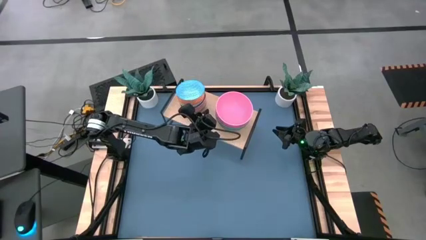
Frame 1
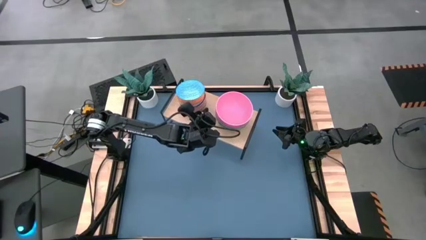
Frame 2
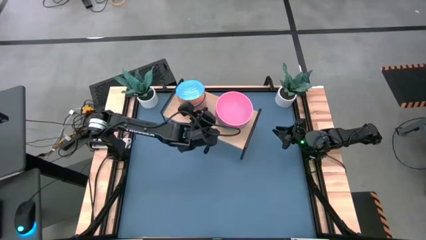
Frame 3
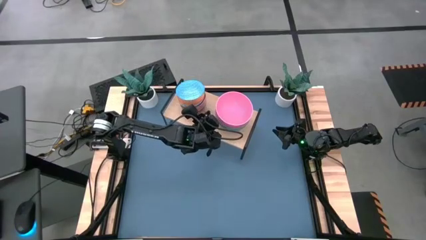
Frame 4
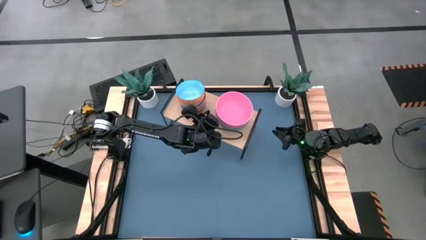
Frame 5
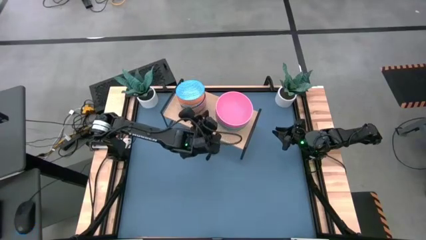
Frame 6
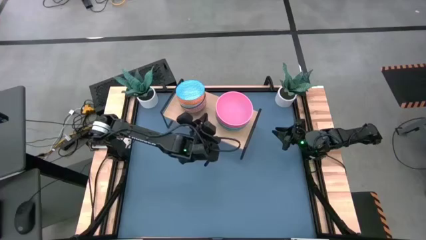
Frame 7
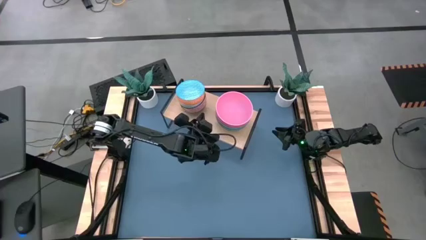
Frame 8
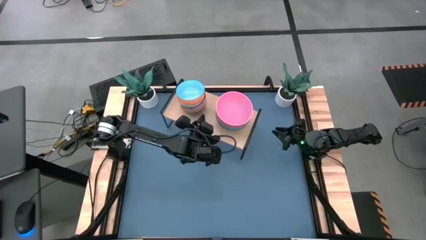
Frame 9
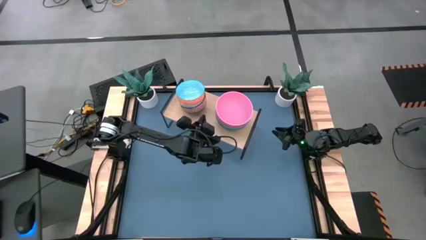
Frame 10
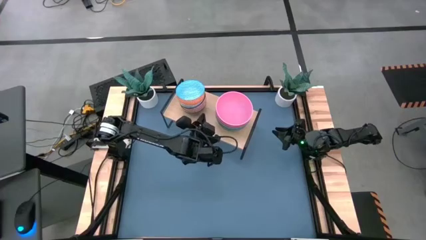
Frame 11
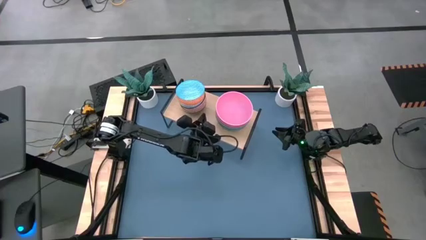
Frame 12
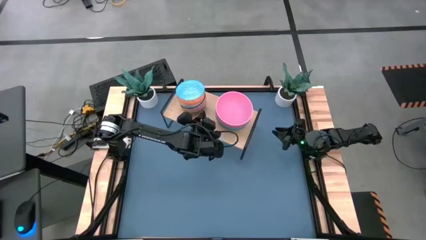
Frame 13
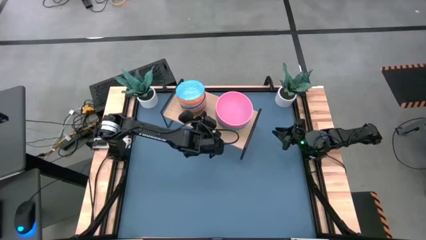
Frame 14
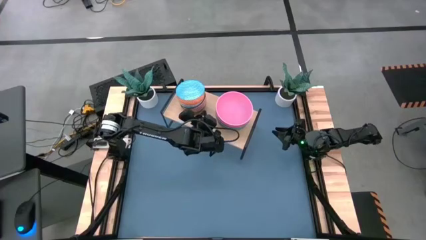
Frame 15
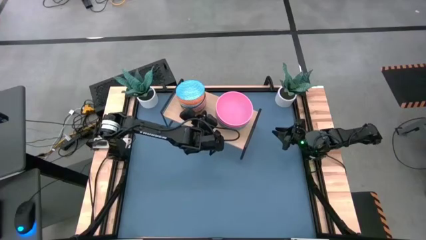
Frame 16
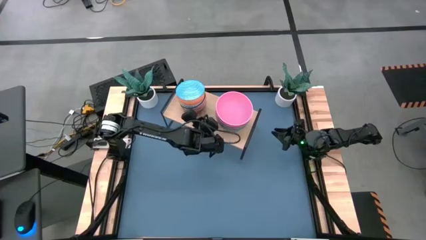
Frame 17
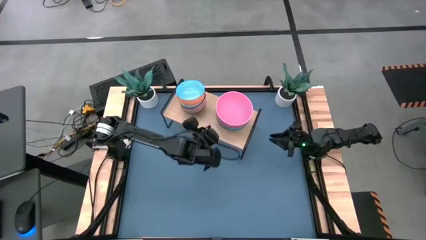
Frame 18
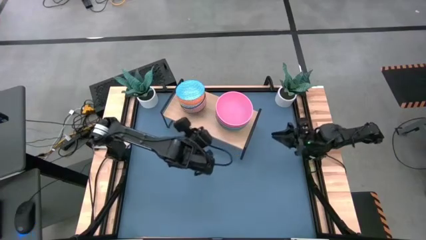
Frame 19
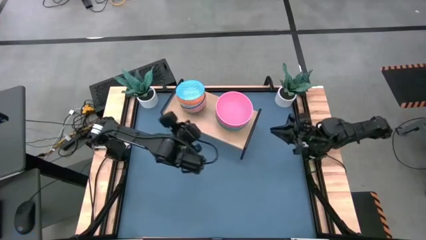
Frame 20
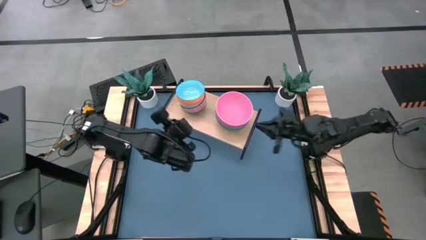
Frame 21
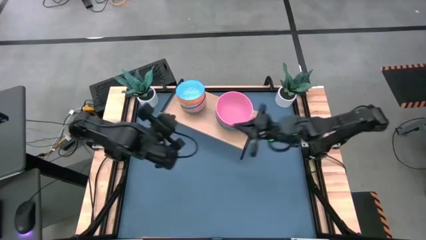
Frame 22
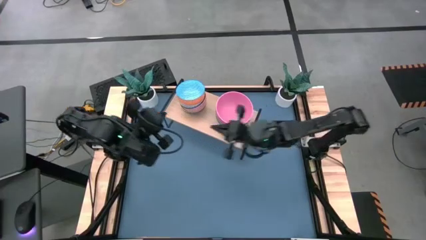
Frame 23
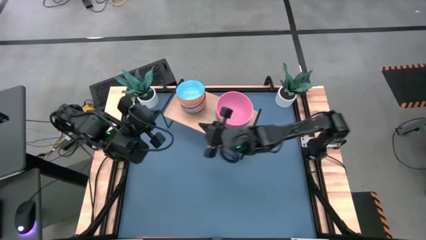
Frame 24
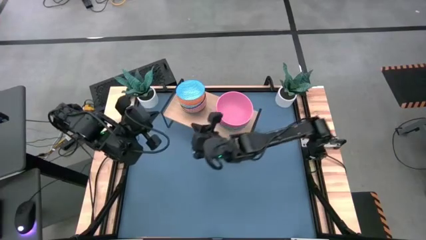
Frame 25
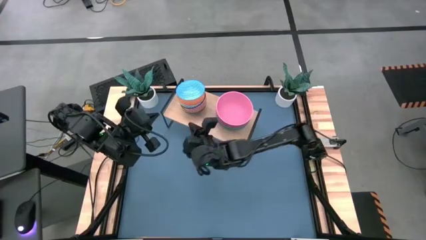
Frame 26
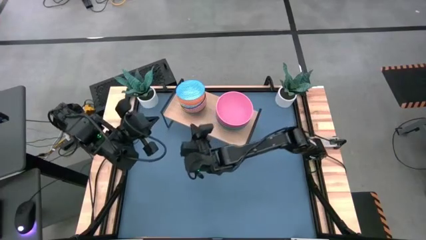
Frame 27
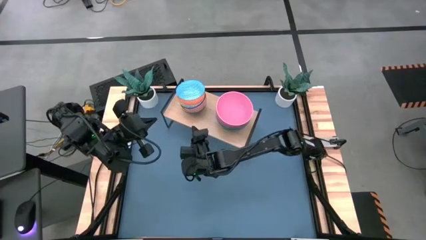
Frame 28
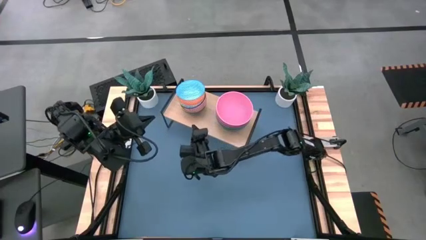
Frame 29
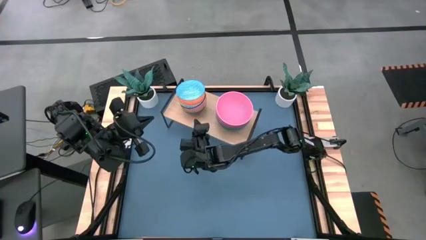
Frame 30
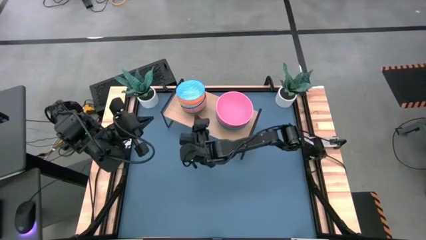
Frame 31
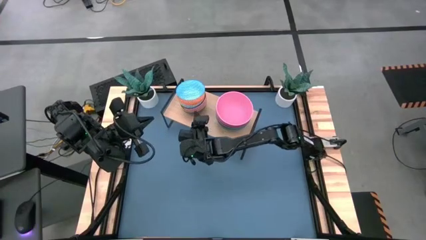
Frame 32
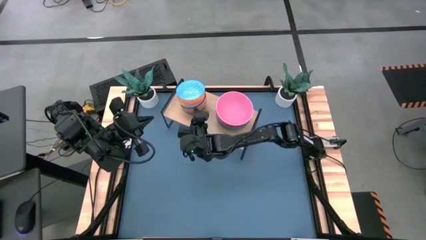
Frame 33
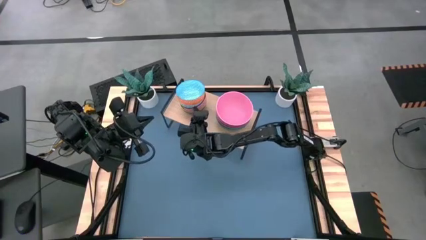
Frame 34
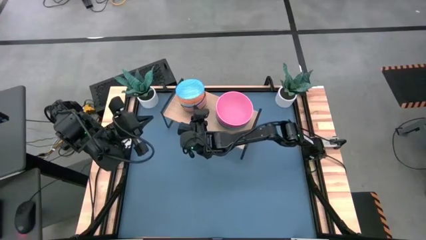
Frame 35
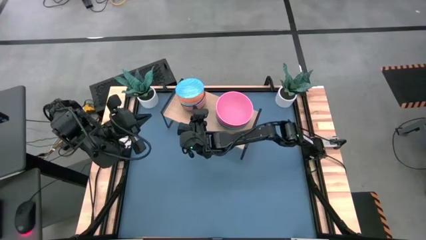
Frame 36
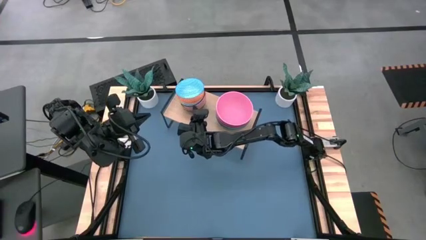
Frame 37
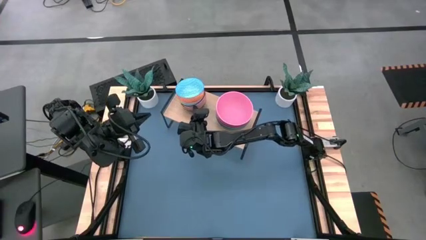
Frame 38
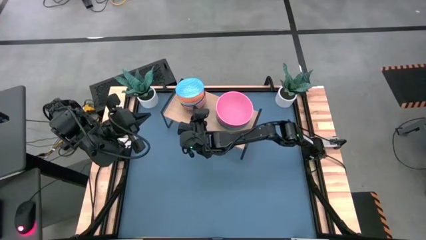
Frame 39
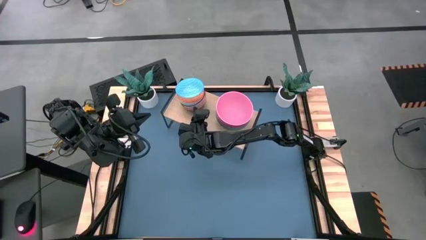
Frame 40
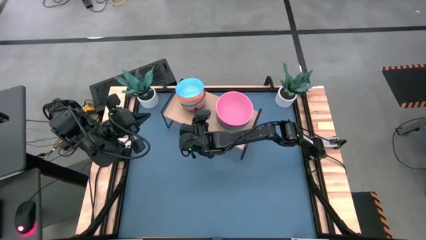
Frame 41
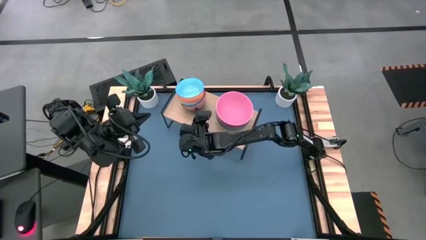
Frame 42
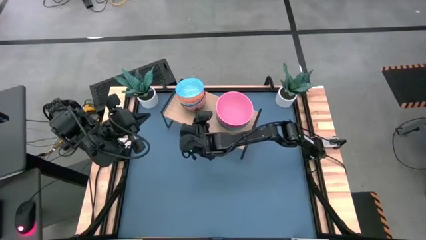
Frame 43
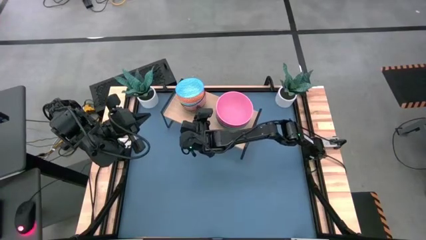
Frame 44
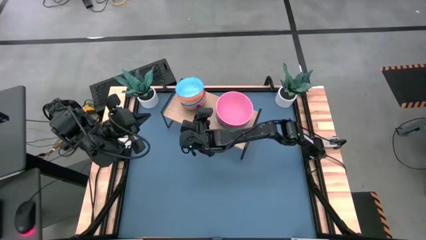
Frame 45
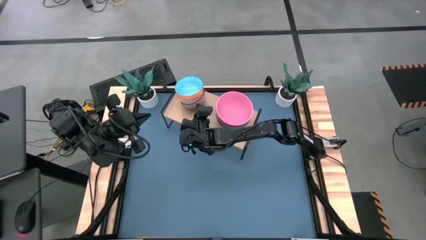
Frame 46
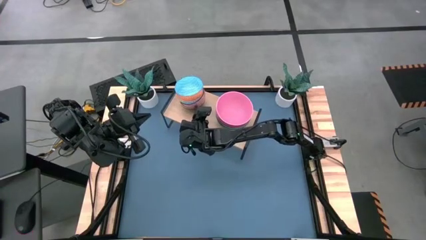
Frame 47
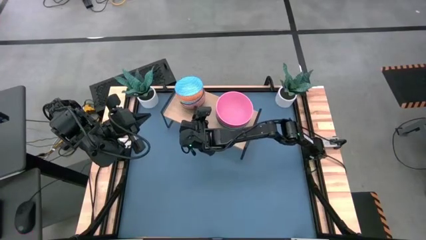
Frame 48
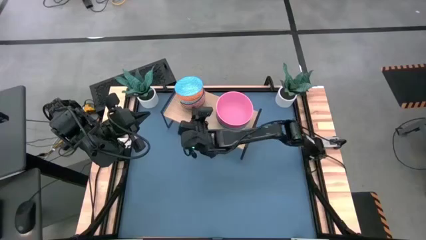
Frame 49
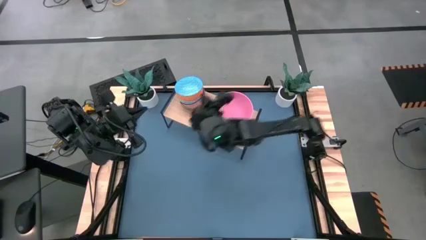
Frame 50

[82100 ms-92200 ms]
Task: Place and stack bowls onto a shelf
Stack the printed blue bowl on the printed orange bowl on the shelf

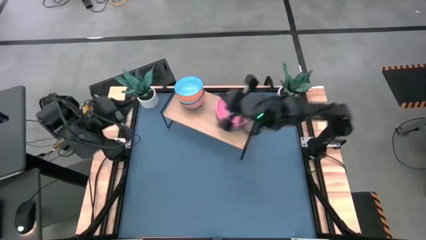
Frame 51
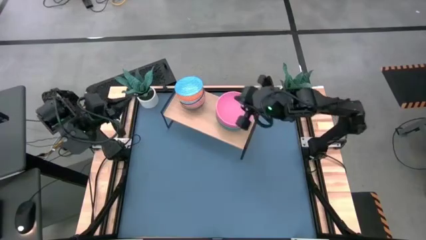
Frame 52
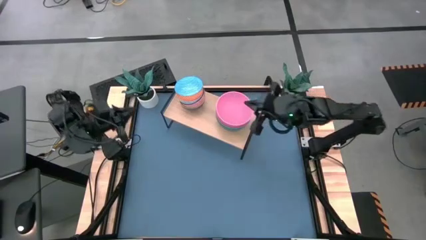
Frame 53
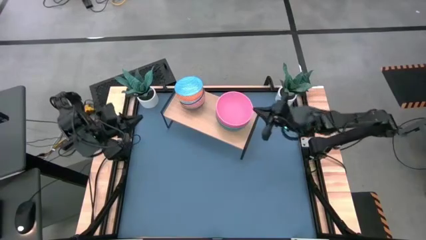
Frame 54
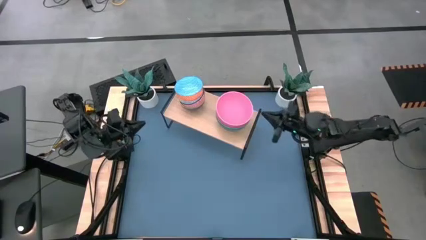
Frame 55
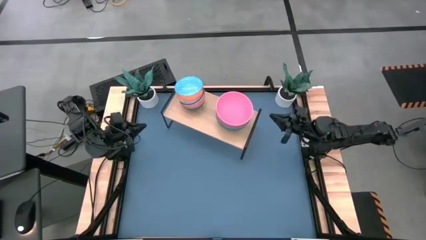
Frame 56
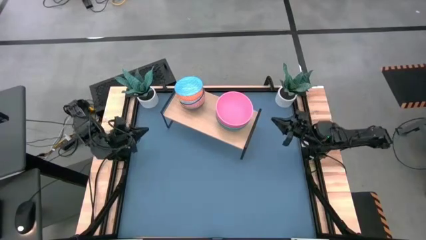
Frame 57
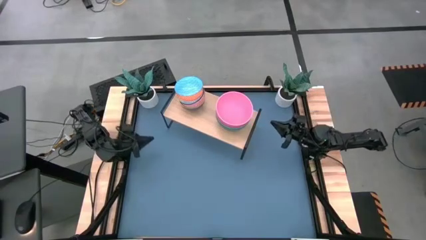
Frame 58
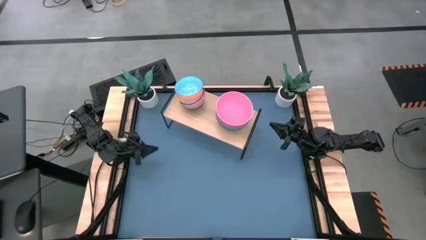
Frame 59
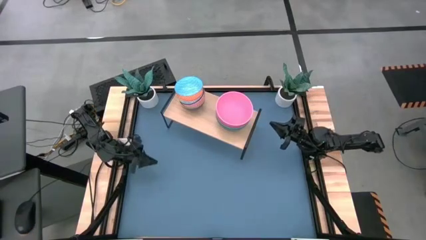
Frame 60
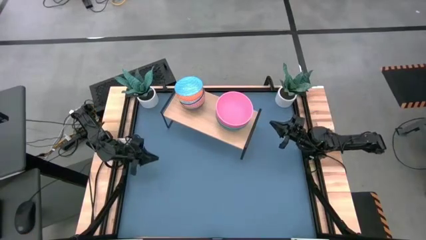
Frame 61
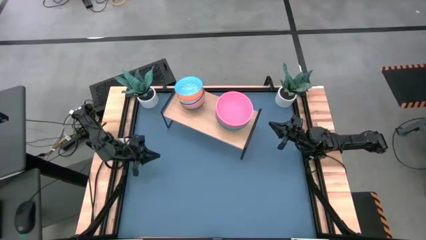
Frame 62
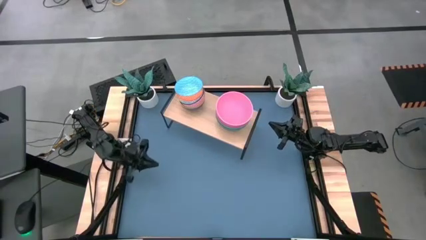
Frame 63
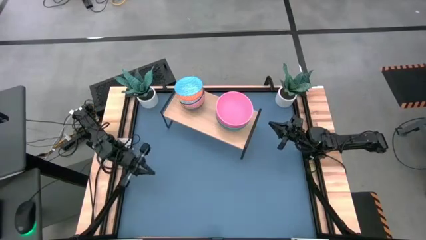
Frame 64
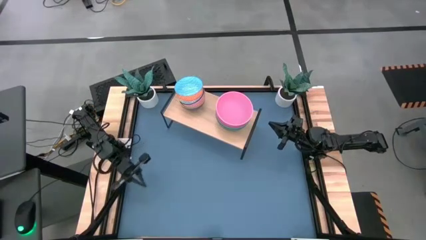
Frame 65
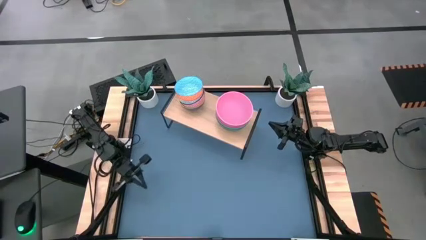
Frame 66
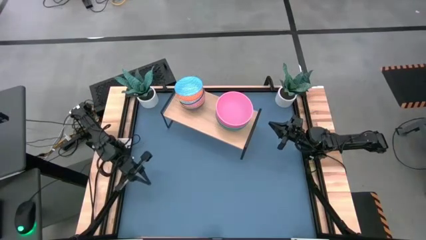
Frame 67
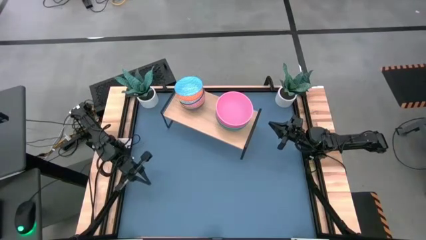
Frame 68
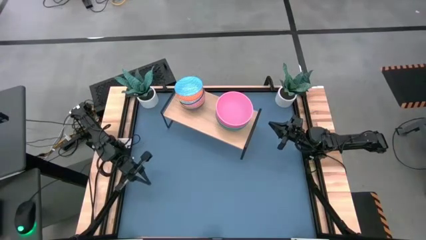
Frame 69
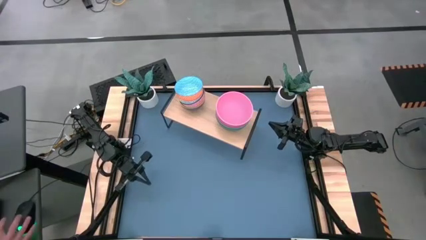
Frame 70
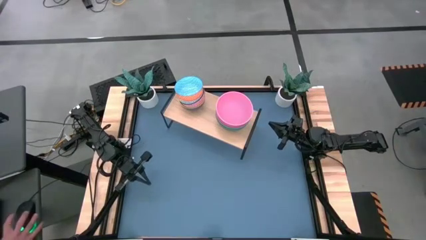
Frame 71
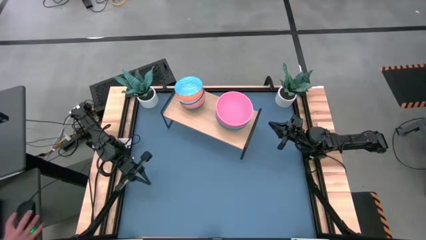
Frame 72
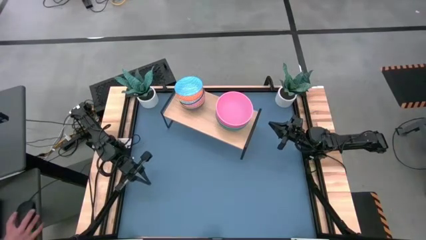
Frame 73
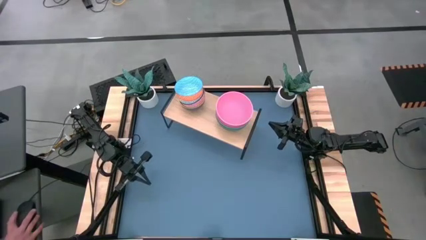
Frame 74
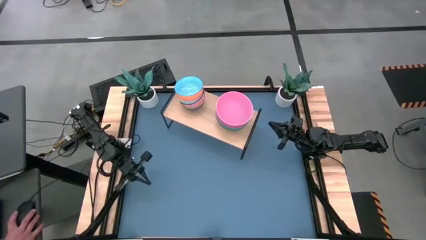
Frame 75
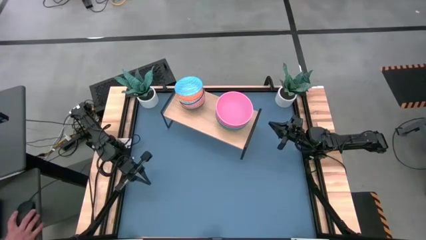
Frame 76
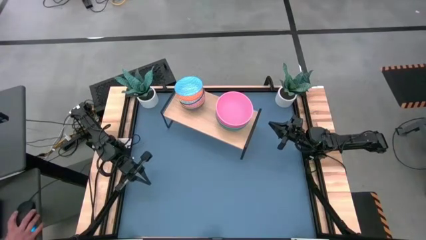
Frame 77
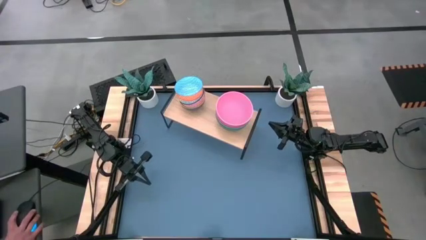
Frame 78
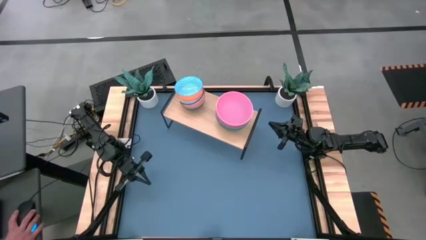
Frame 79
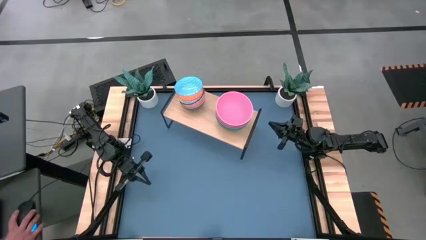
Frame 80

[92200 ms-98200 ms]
Return to Home Position
